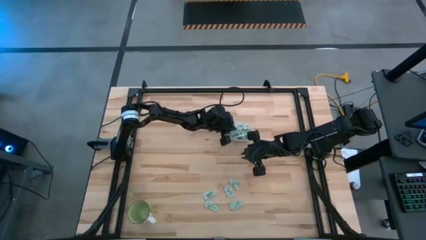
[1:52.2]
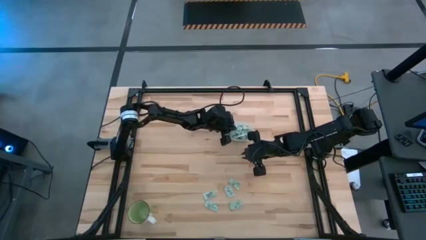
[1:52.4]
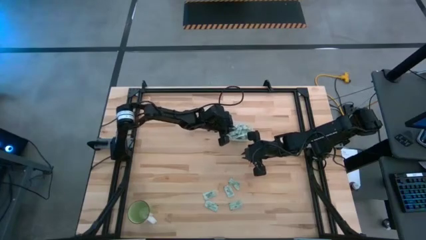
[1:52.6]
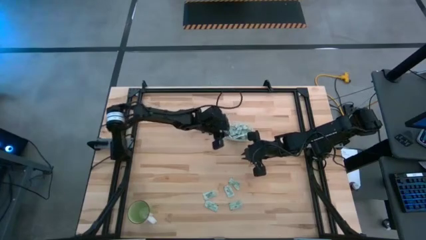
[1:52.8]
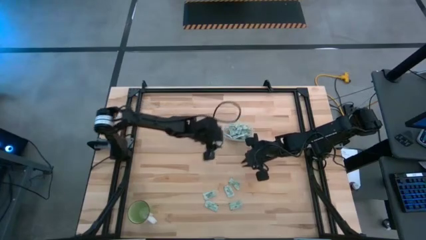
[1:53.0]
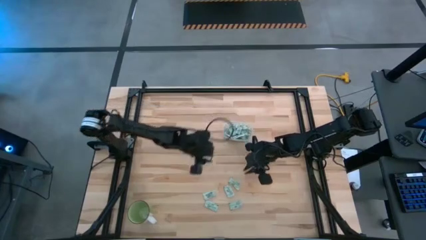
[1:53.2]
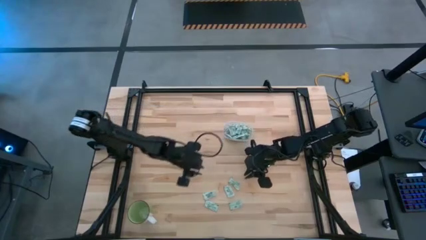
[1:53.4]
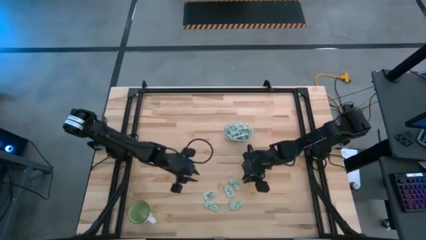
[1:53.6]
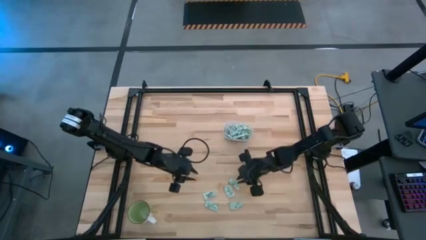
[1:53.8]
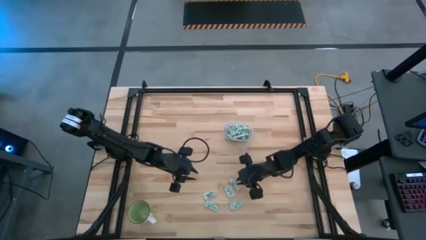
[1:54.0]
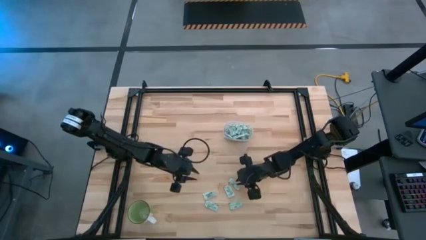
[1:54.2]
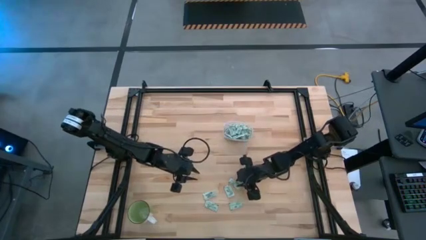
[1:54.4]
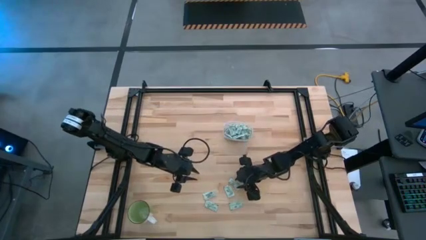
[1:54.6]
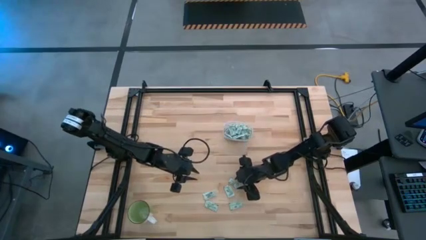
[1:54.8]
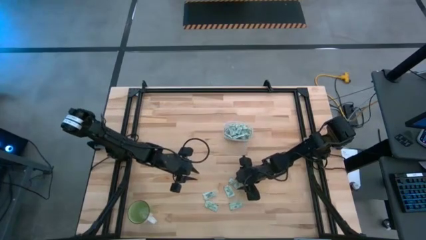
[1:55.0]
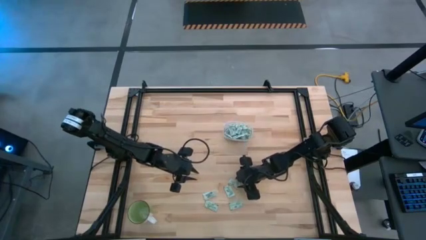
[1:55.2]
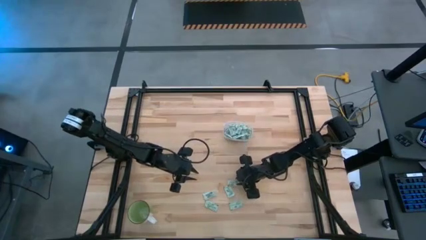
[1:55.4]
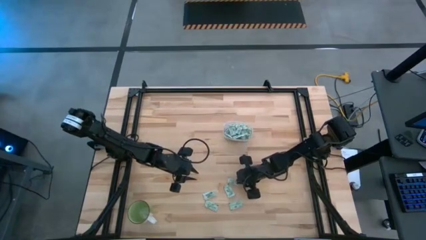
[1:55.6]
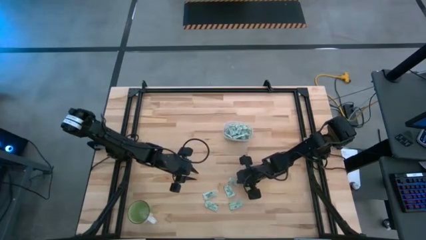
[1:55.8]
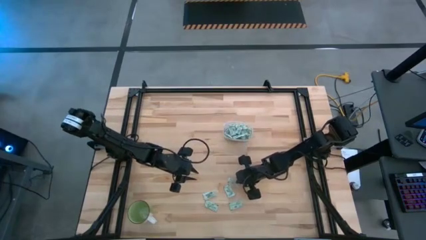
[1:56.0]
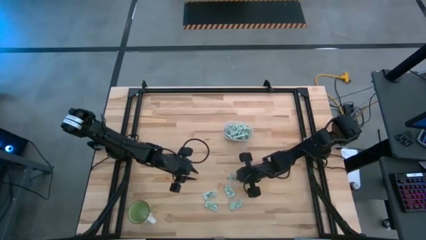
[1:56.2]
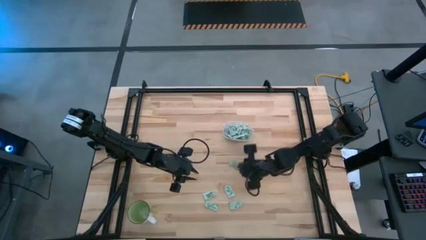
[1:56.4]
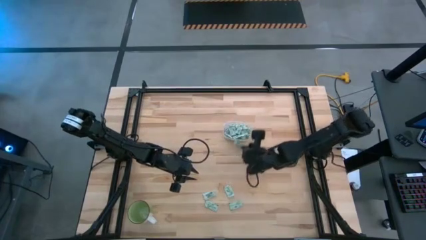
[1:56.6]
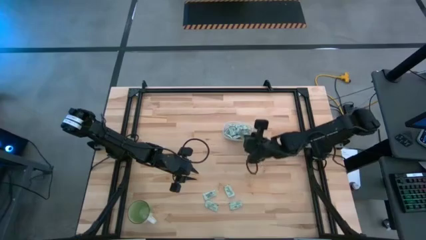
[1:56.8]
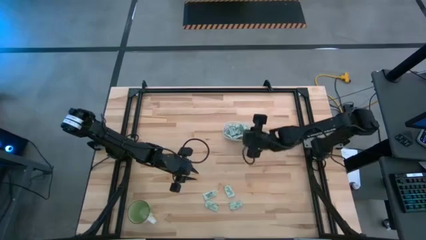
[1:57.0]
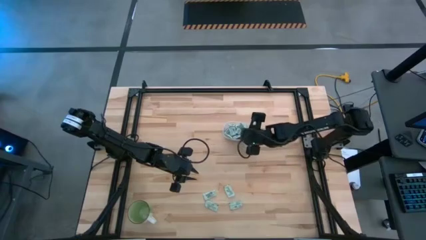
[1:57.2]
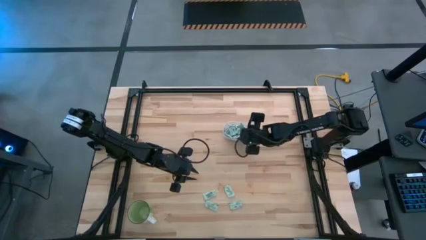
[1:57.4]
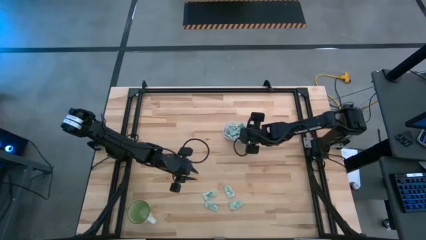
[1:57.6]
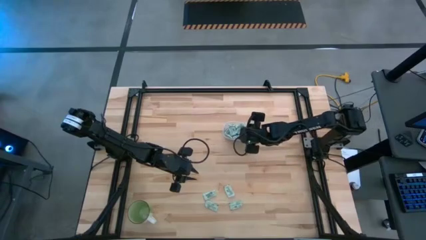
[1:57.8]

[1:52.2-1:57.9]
Task: Pick and place Stevia / Truvia into bins
Put the stevia packet into the transparent bin

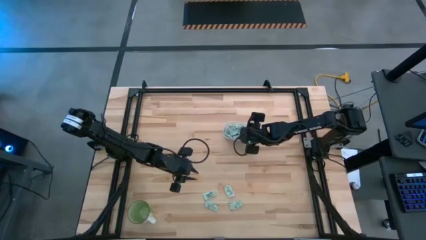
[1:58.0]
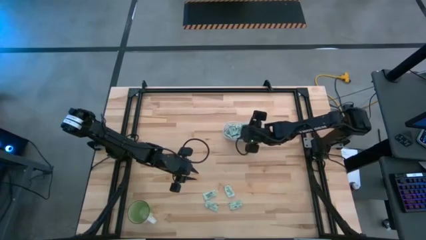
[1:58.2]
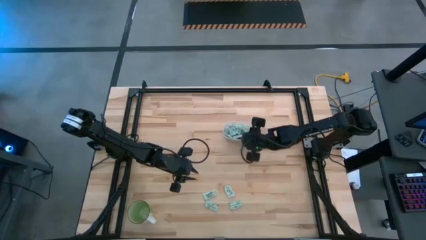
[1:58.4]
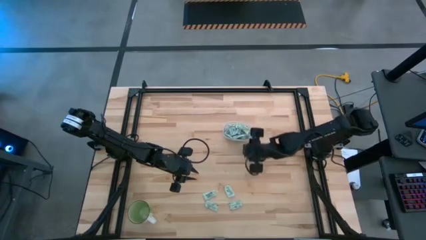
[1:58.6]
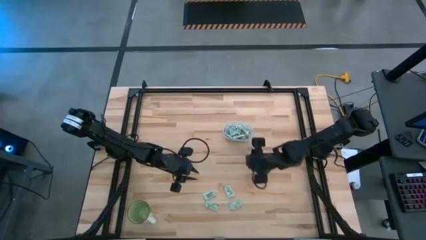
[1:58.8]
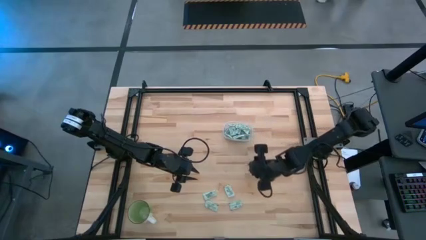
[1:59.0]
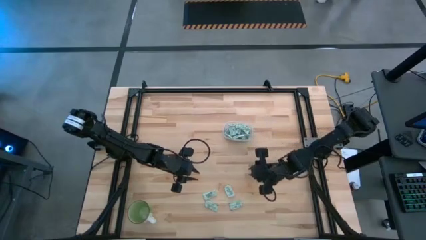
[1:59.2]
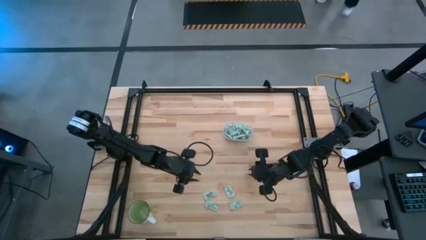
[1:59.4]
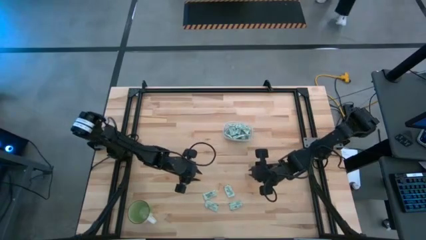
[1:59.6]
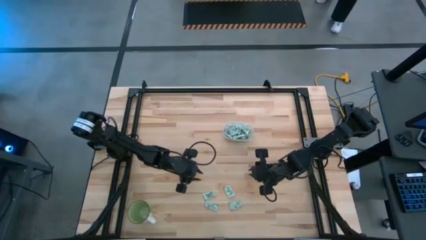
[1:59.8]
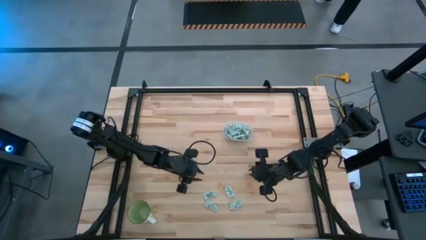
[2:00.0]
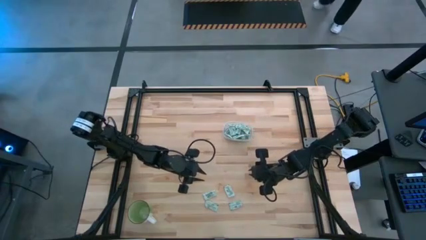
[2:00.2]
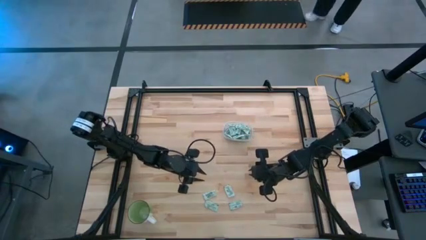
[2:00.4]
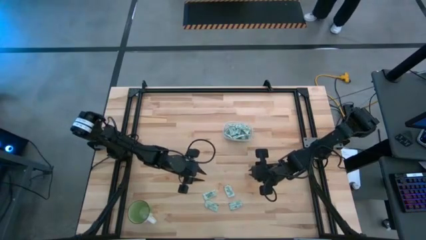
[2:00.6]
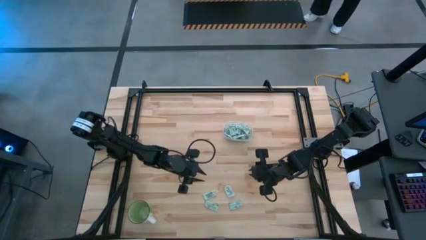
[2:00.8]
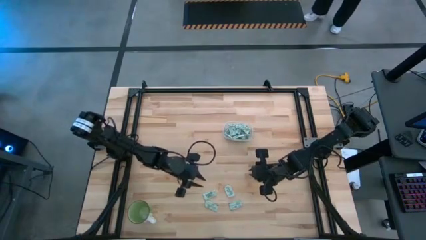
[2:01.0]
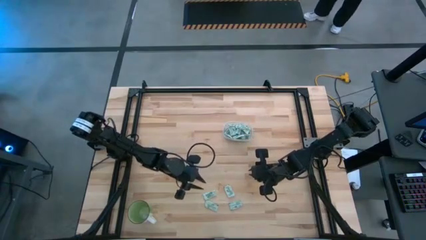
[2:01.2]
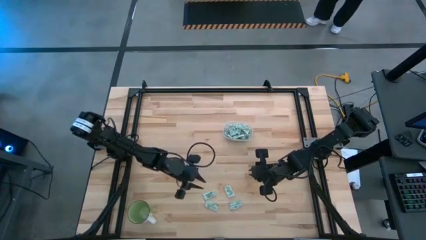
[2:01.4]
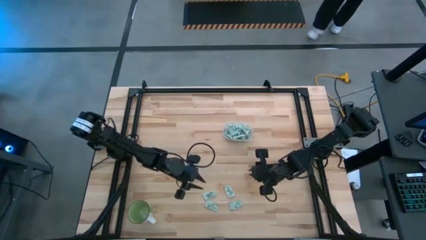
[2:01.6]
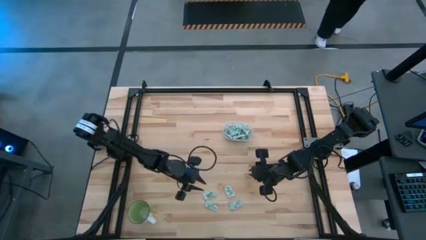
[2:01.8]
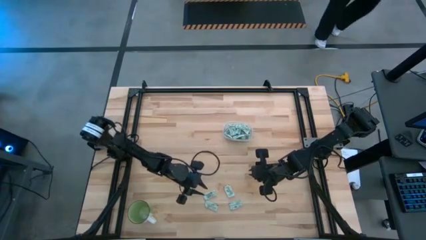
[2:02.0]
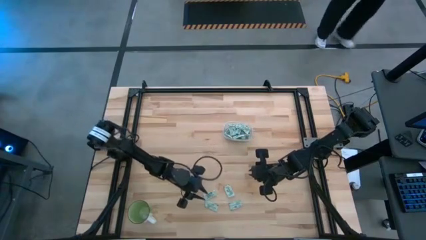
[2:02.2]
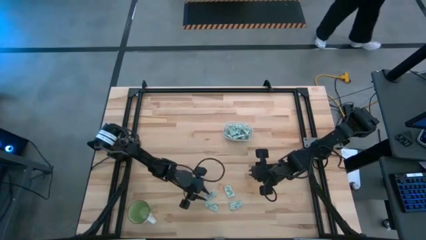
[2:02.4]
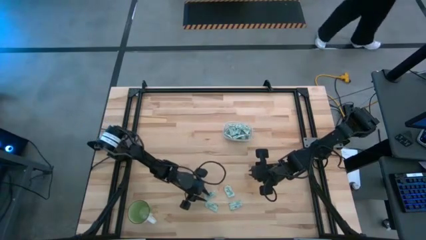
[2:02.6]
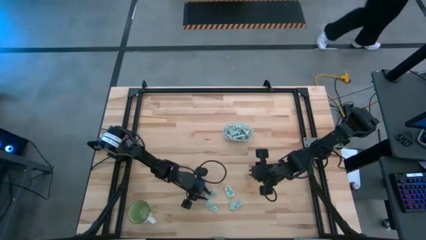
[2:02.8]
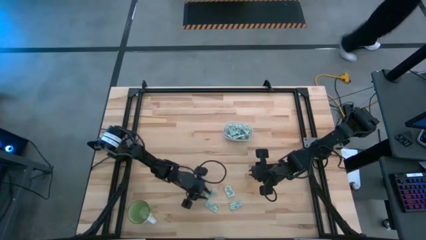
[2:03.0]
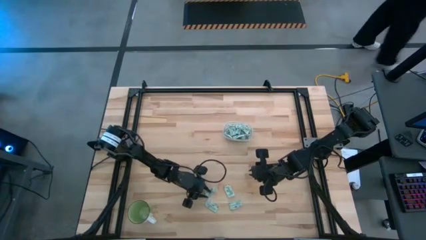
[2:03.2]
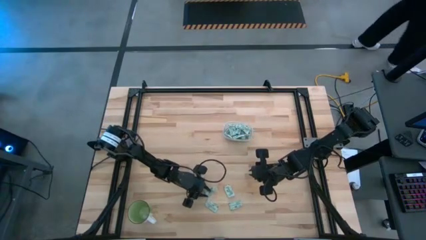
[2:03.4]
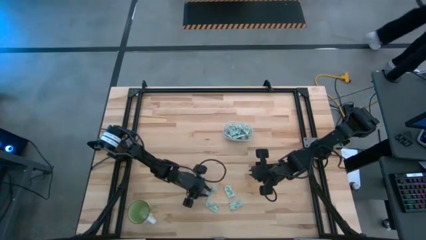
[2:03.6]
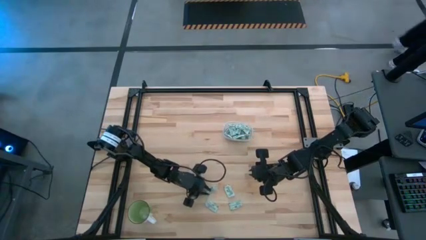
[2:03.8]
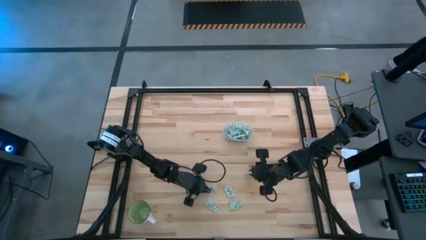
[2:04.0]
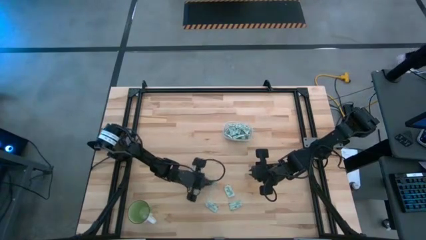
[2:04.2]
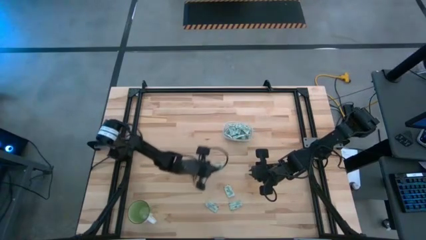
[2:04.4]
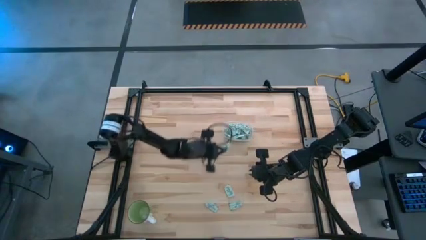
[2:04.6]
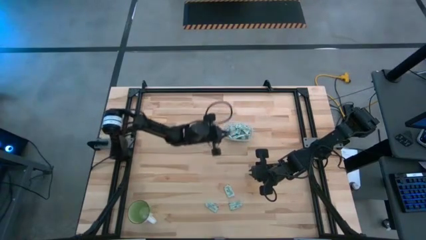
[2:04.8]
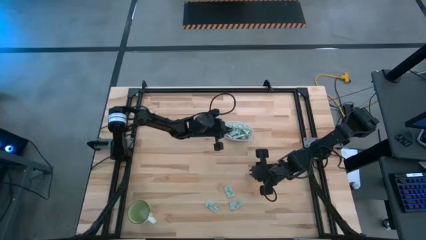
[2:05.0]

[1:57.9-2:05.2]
Put the stevia packet into the transparent bin

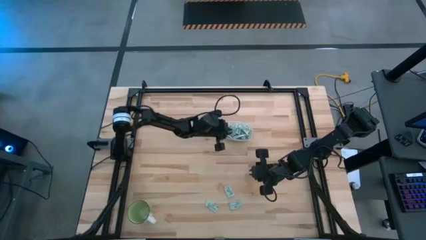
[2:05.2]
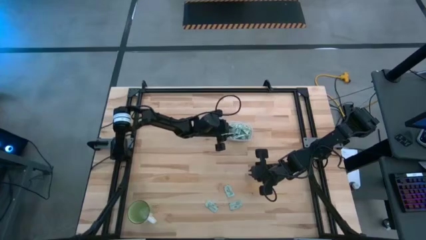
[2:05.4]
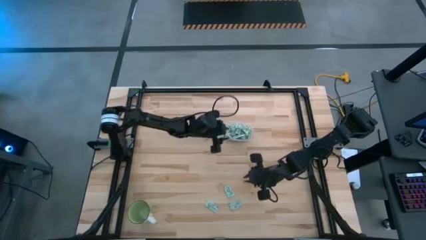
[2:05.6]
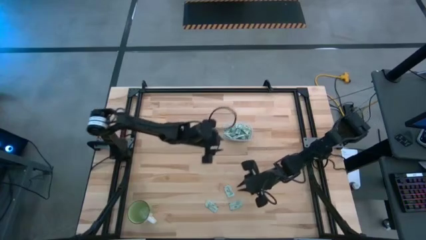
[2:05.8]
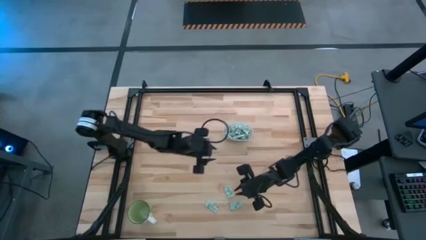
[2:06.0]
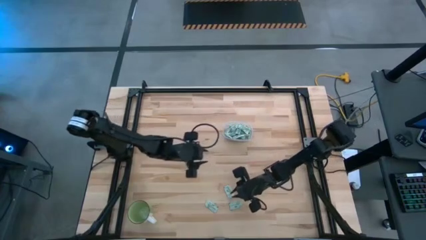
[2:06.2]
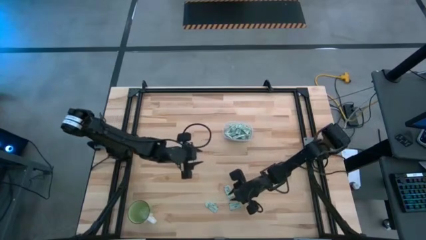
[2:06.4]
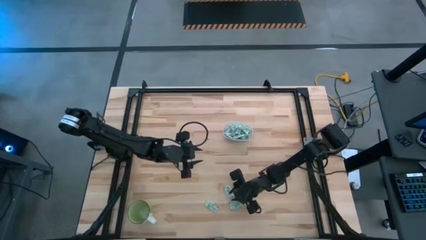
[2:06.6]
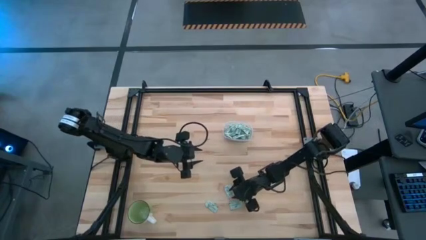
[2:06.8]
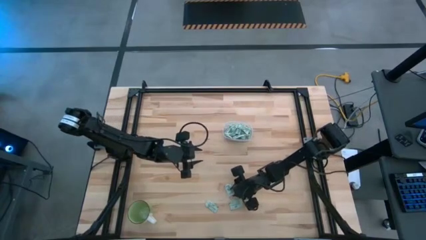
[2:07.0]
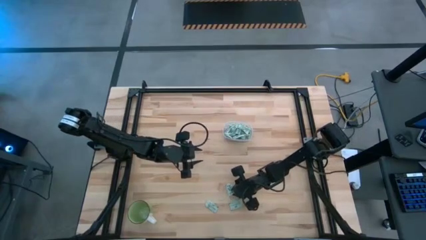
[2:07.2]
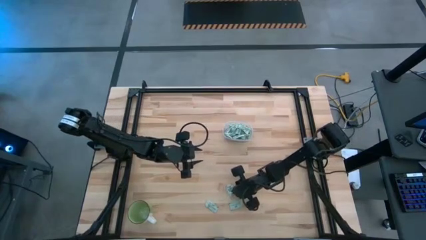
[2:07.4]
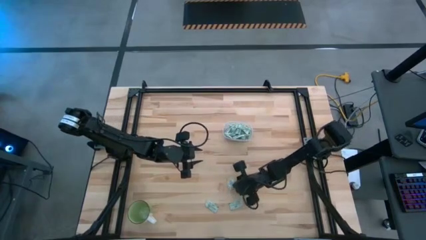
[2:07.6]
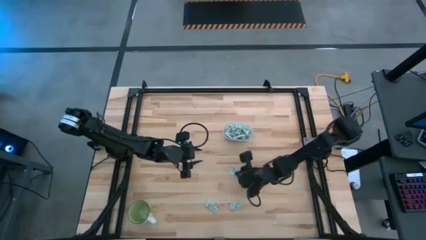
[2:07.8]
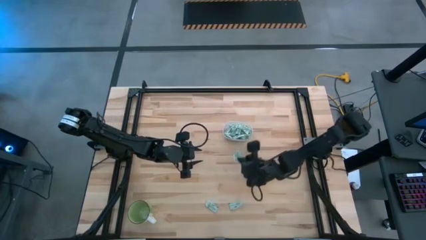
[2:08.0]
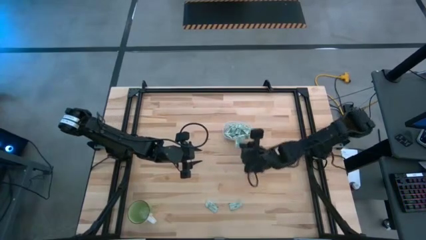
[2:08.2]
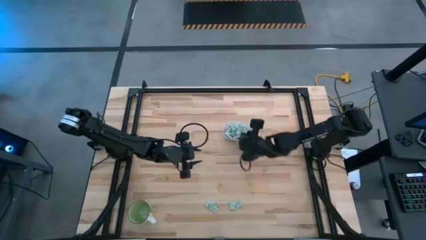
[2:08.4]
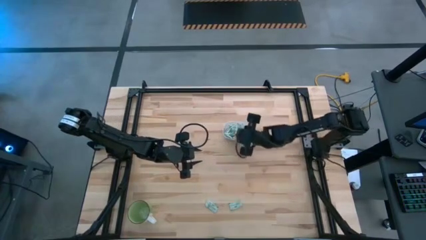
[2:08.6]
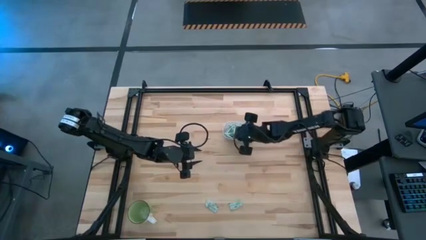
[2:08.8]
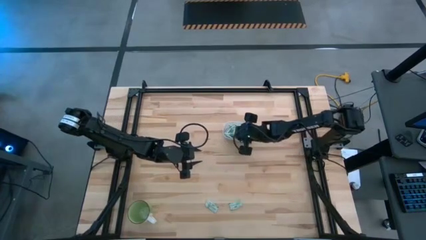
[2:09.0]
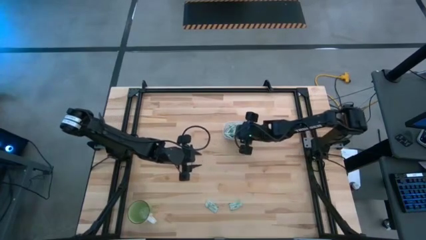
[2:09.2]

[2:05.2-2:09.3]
Put the stevia packet into the transparent bin
